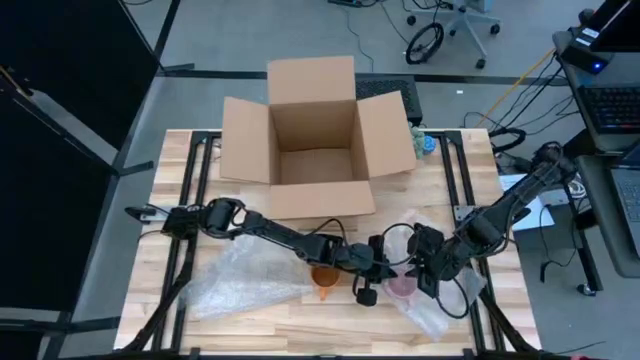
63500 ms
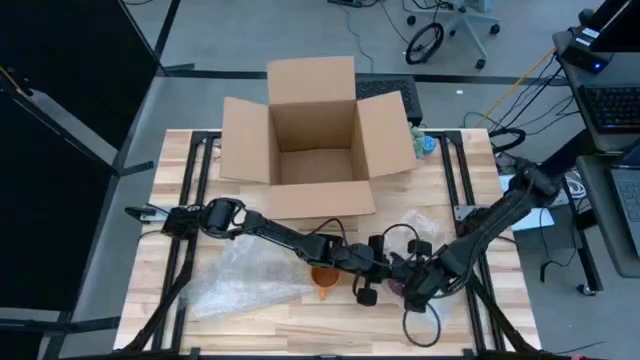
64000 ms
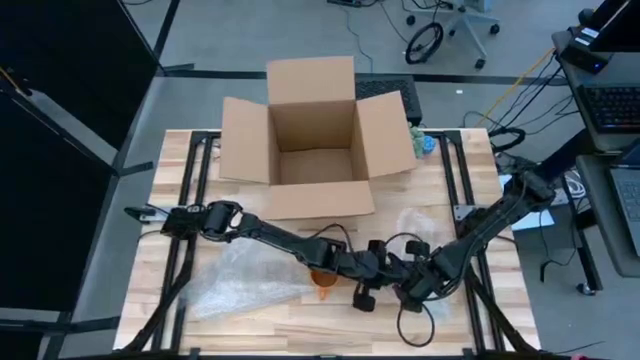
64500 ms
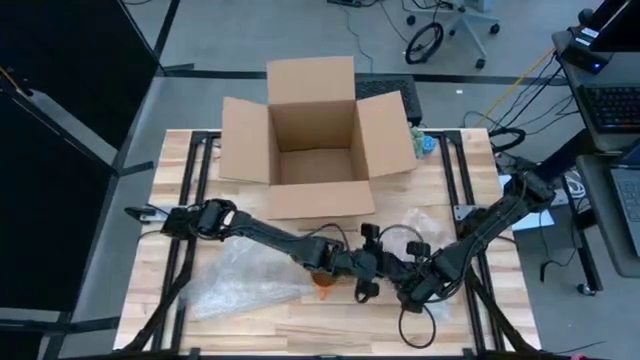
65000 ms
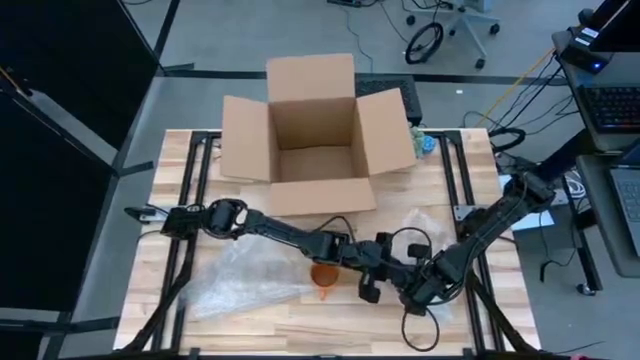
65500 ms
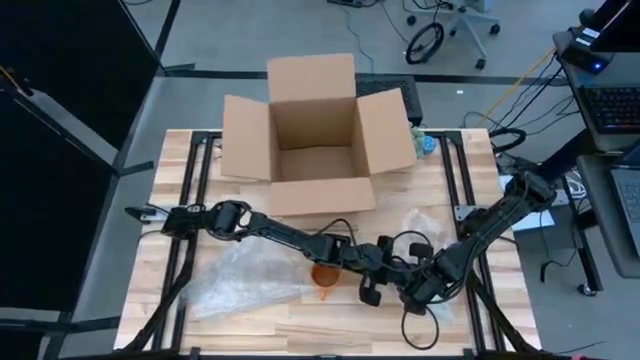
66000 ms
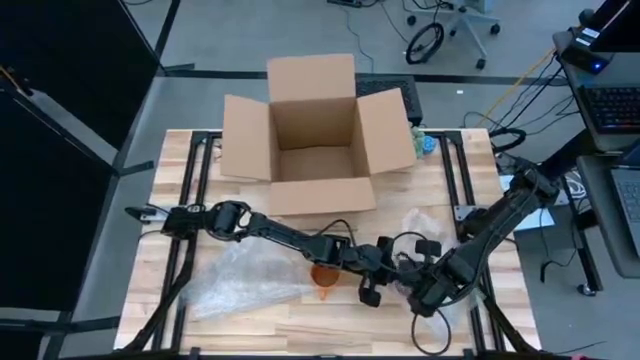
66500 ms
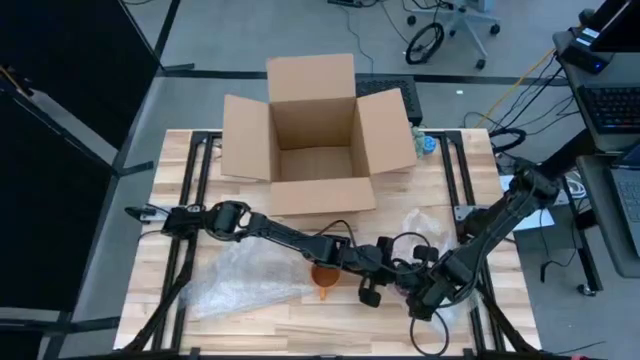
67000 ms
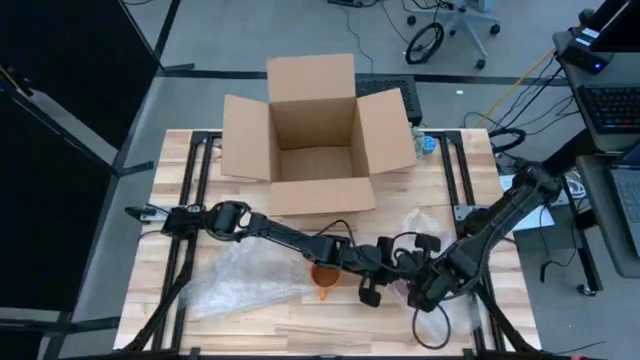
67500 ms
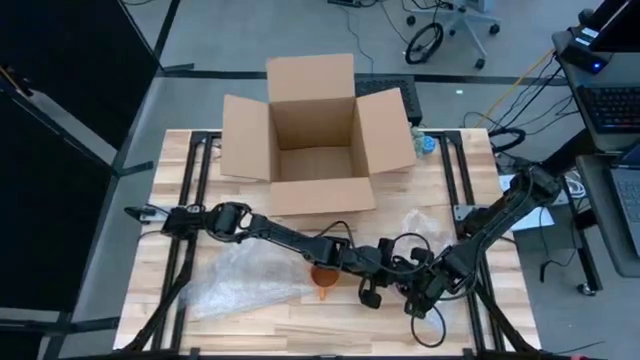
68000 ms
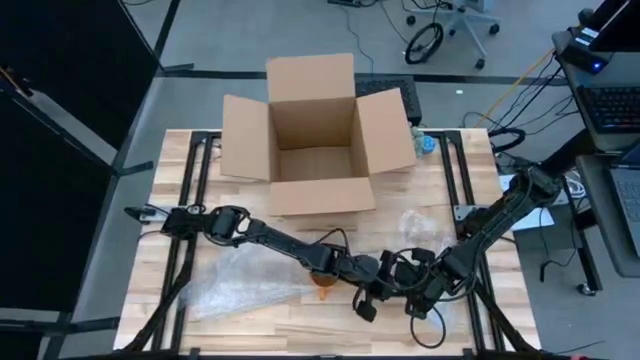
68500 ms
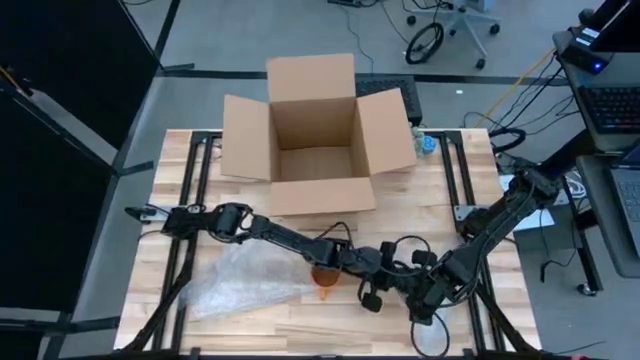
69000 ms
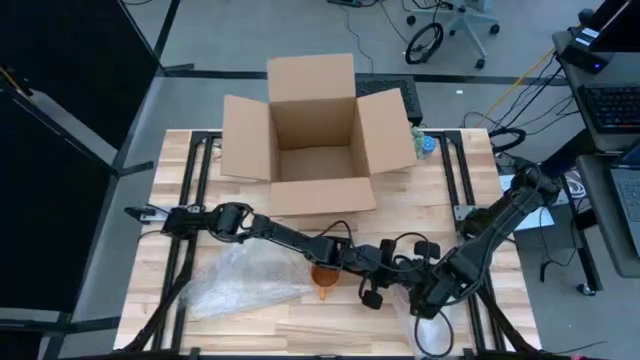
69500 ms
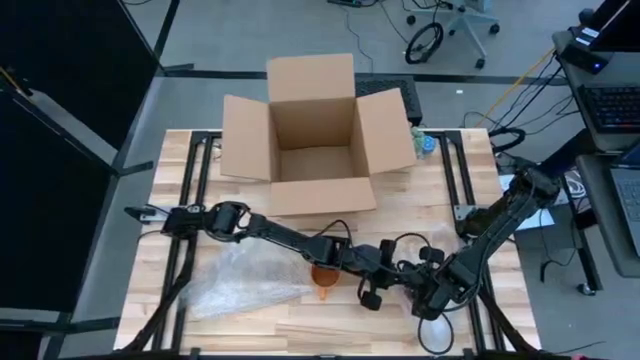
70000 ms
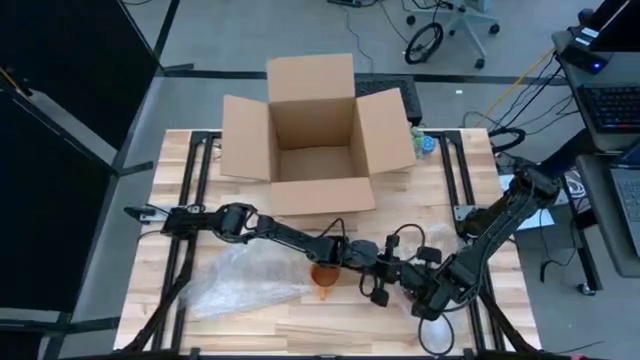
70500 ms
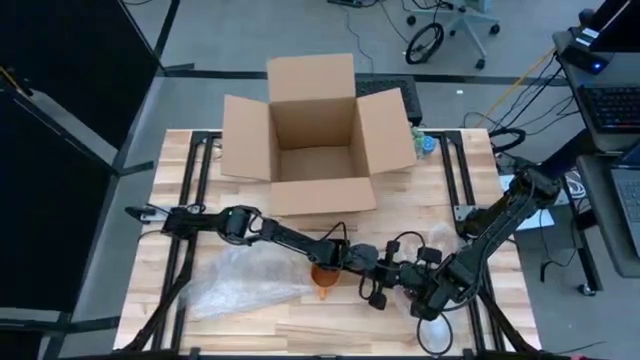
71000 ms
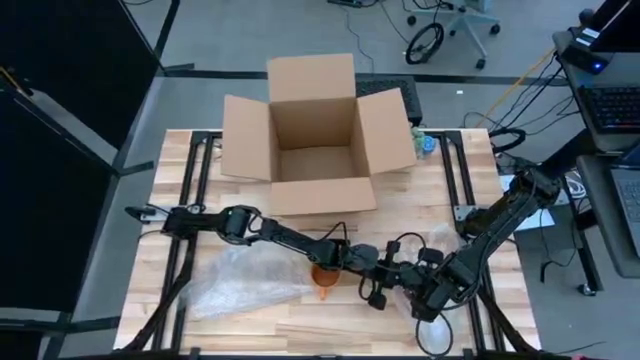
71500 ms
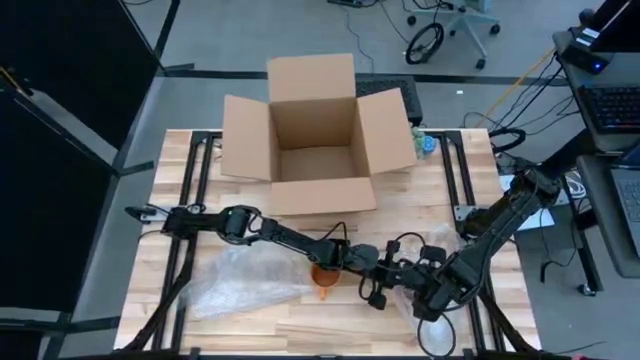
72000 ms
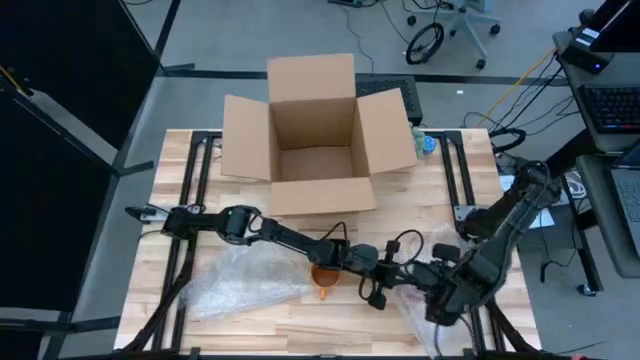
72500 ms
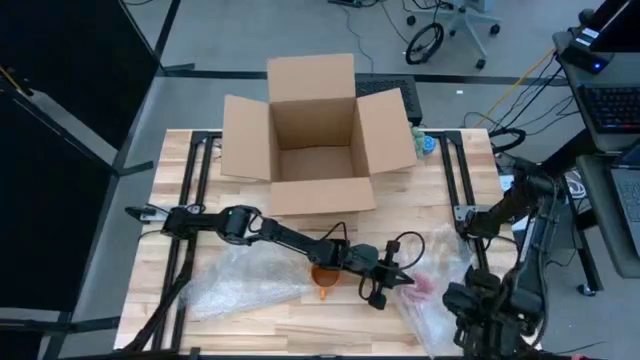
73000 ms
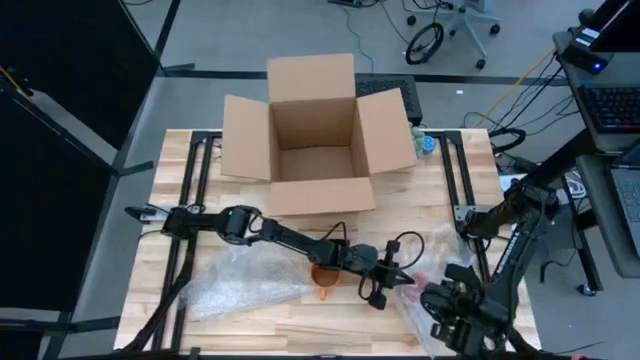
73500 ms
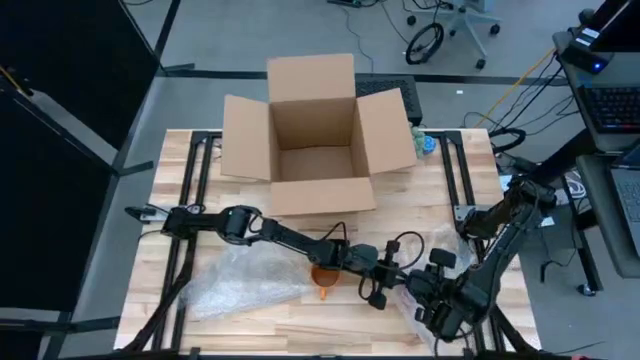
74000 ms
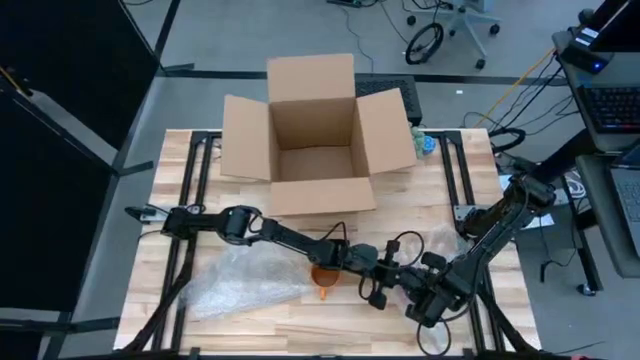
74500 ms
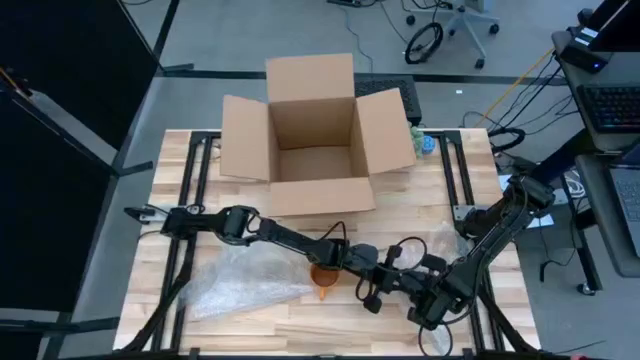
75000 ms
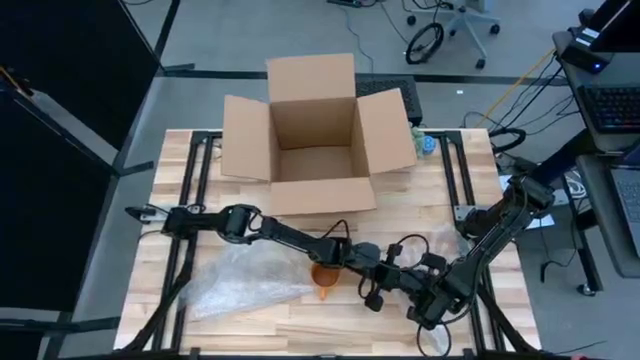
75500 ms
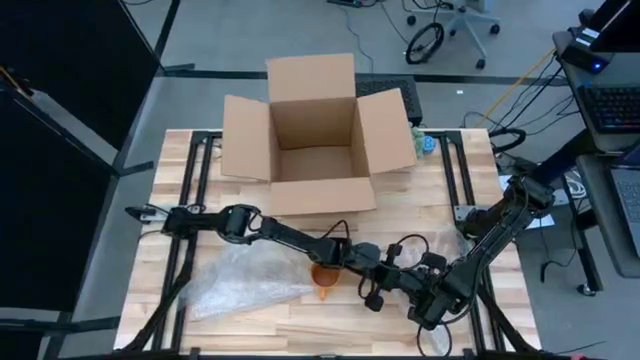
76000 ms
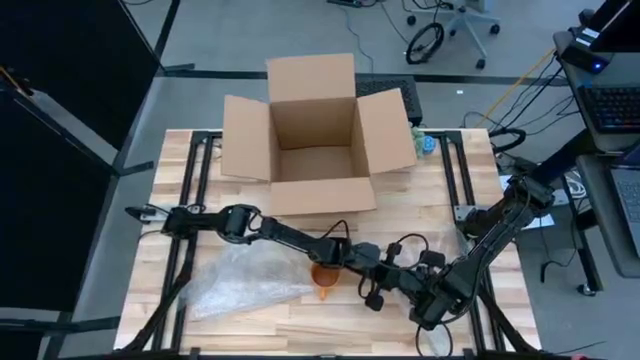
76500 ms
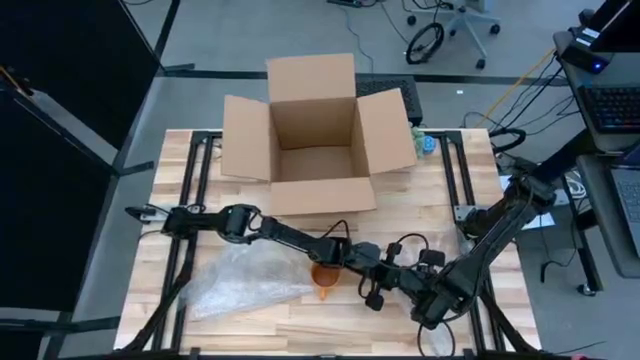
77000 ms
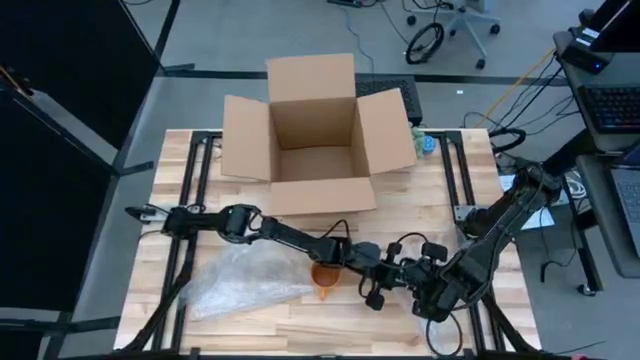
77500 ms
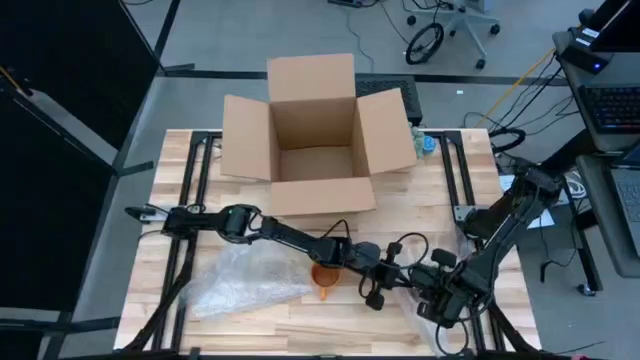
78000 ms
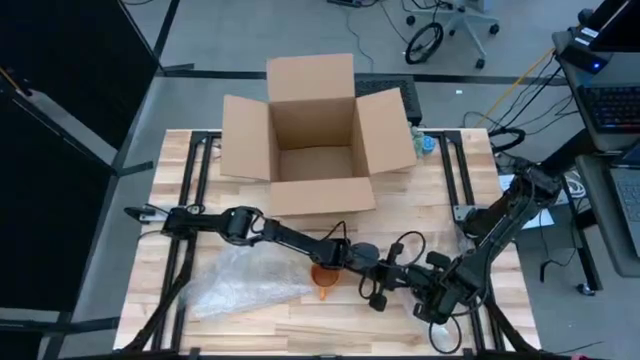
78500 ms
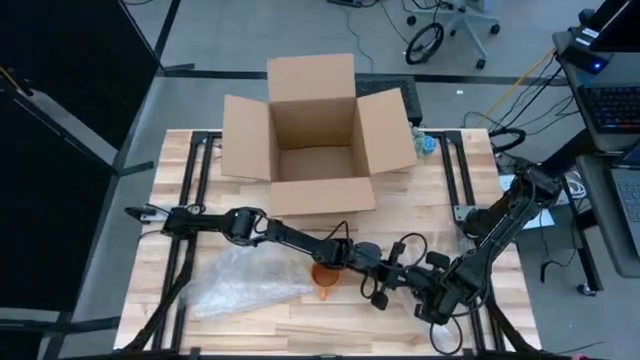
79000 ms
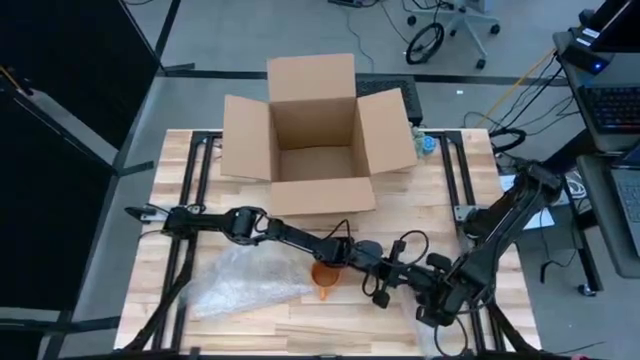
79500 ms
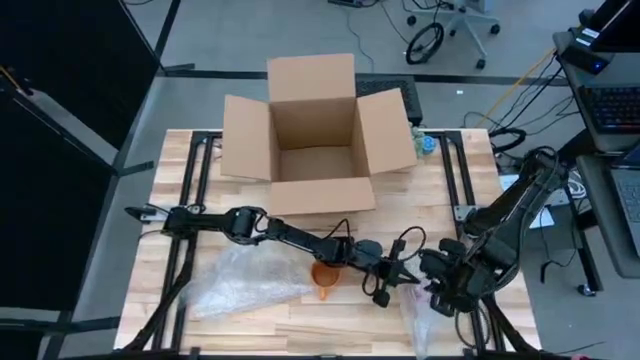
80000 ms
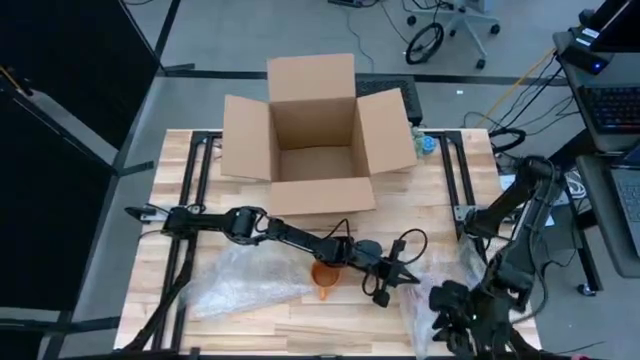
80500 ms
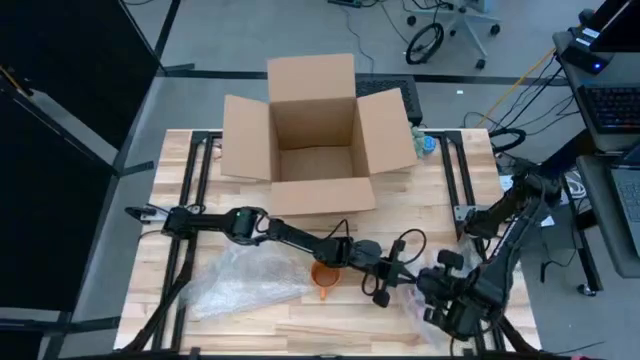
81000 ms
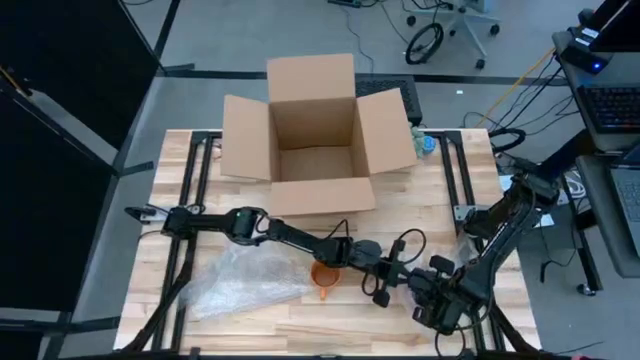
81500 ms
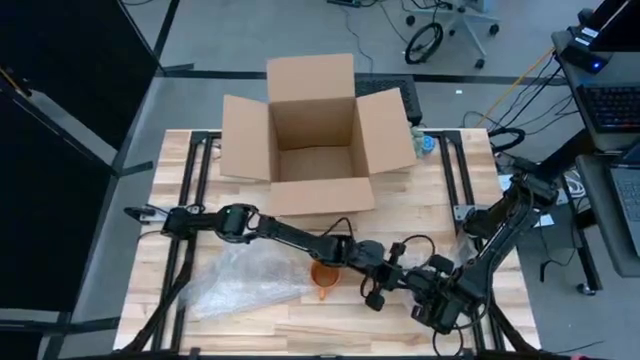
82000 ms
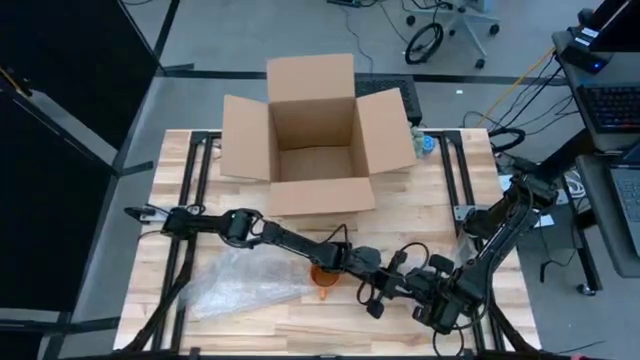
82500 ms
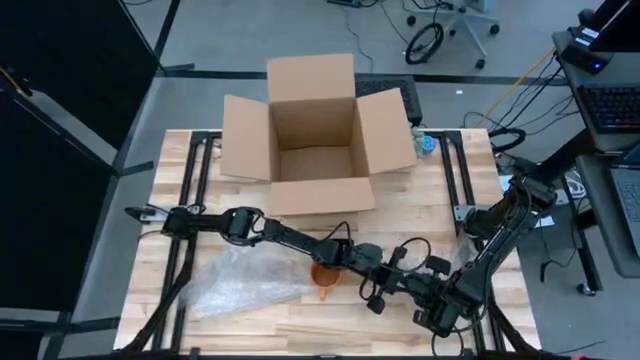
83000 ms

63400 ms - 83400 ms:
Task: wrap mug
Wrap the pink mug with the transparent bubble wrap
